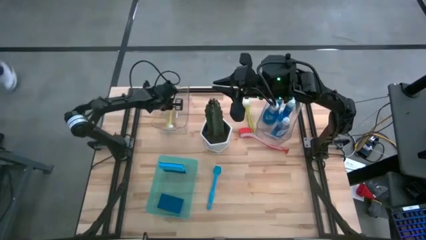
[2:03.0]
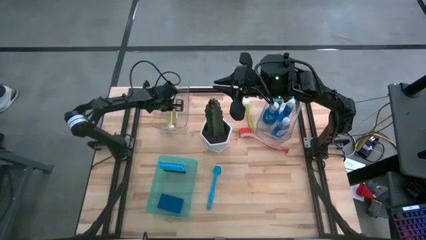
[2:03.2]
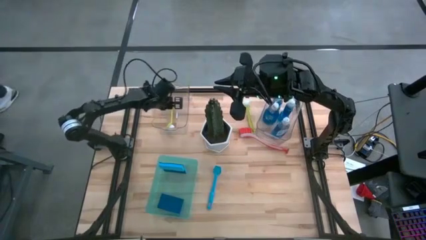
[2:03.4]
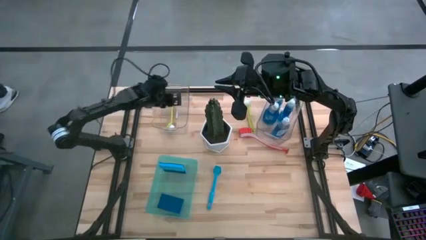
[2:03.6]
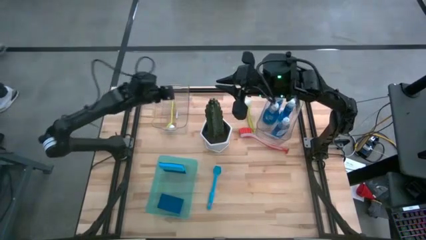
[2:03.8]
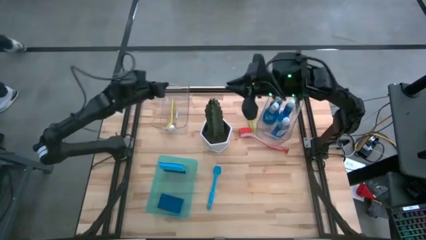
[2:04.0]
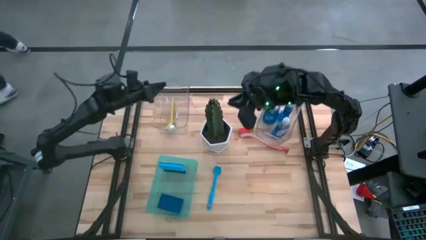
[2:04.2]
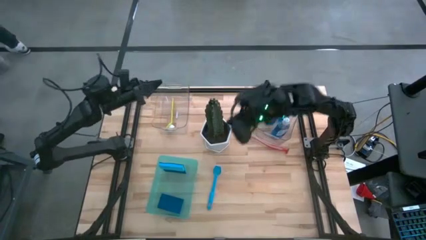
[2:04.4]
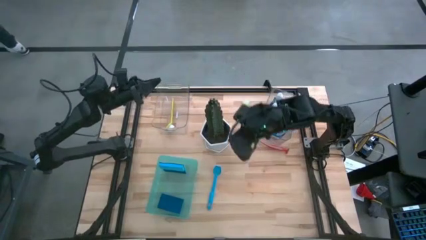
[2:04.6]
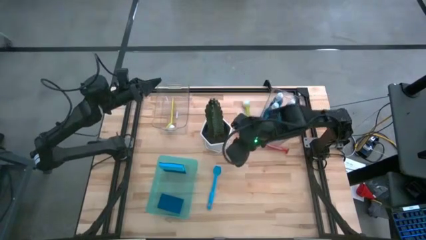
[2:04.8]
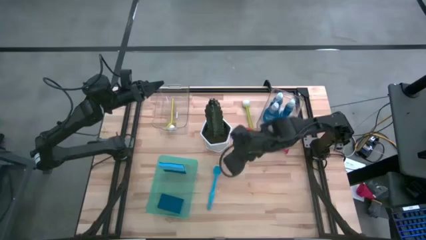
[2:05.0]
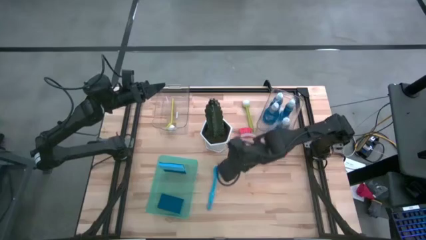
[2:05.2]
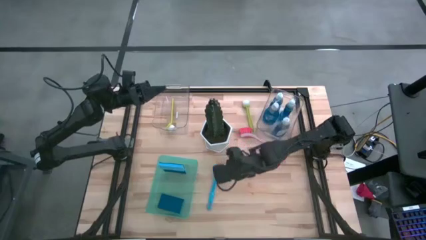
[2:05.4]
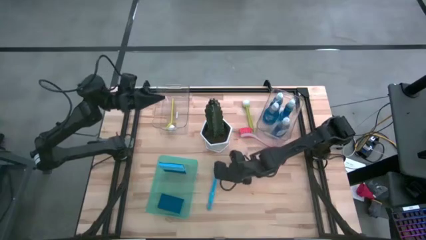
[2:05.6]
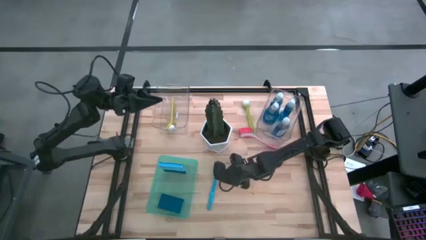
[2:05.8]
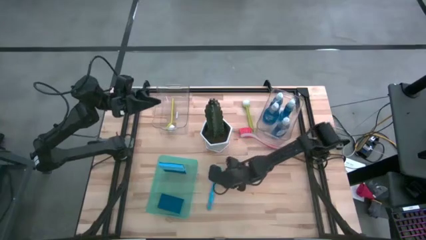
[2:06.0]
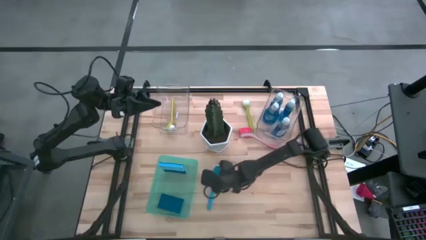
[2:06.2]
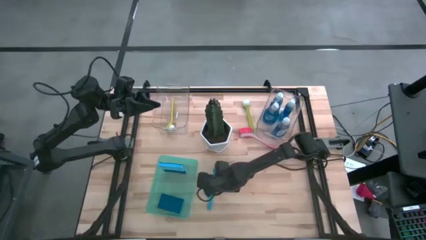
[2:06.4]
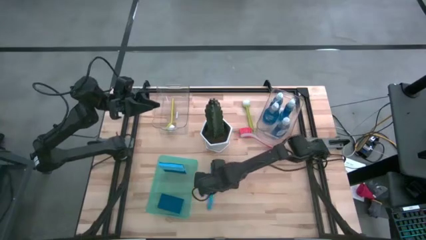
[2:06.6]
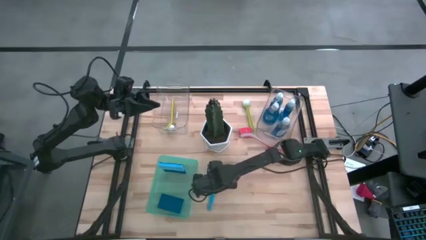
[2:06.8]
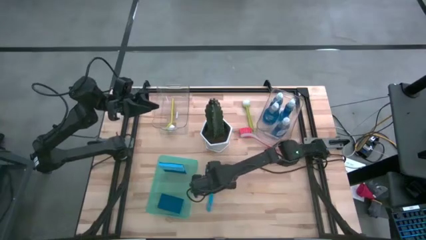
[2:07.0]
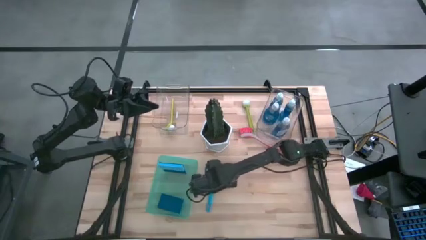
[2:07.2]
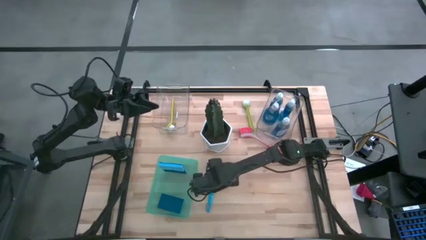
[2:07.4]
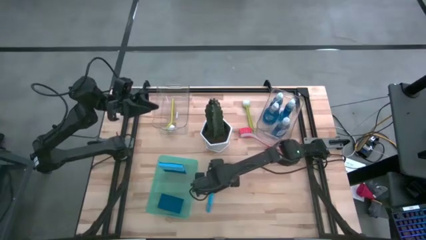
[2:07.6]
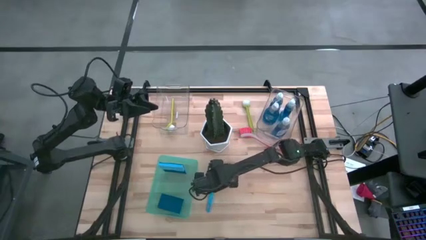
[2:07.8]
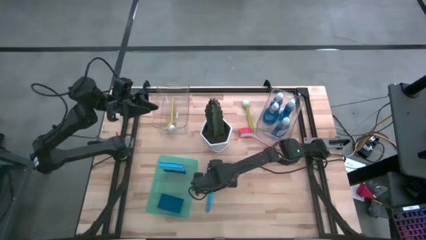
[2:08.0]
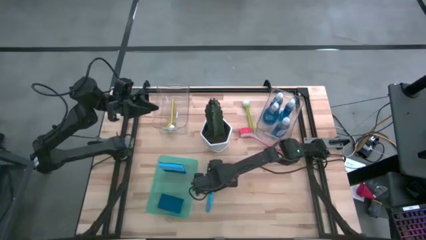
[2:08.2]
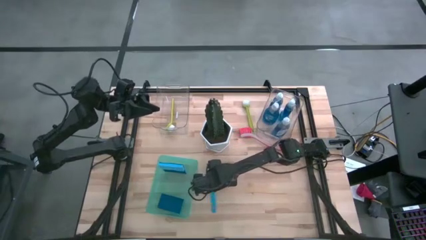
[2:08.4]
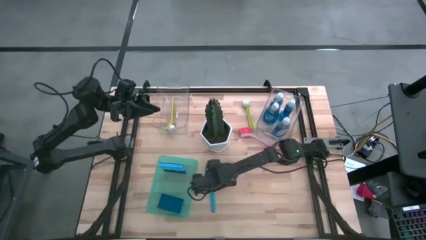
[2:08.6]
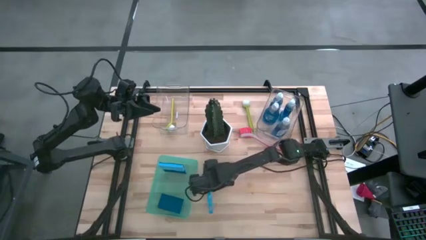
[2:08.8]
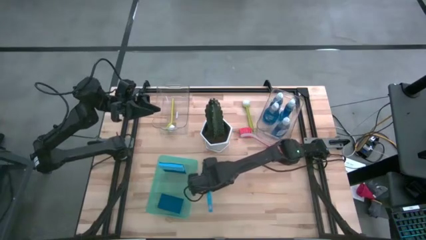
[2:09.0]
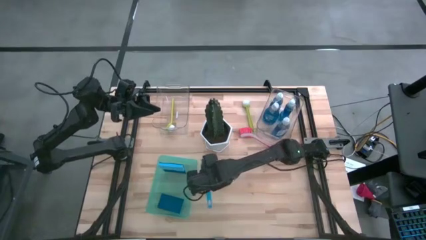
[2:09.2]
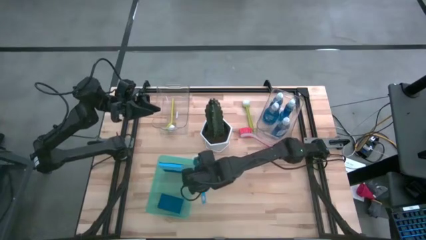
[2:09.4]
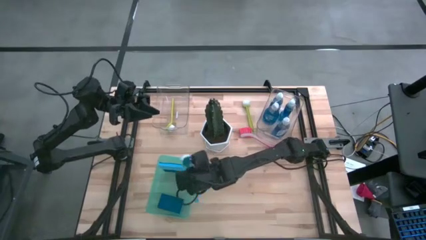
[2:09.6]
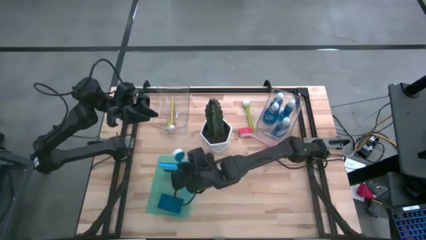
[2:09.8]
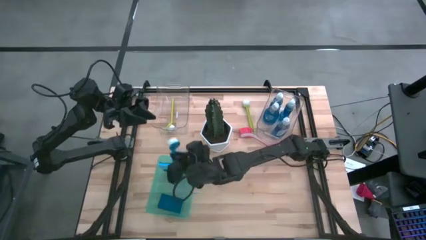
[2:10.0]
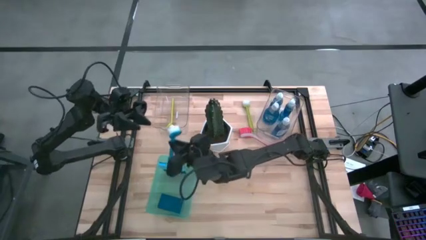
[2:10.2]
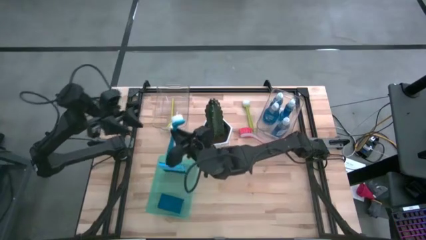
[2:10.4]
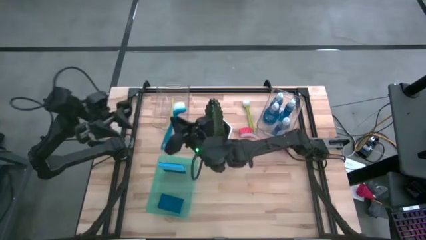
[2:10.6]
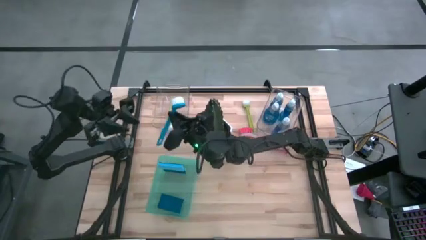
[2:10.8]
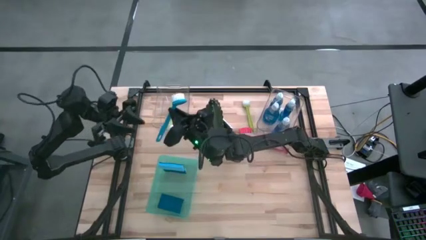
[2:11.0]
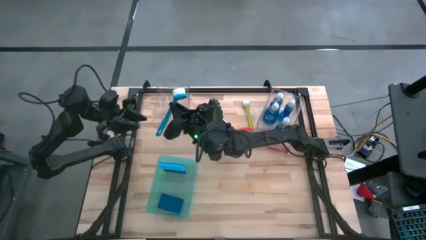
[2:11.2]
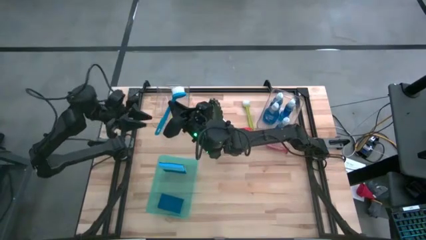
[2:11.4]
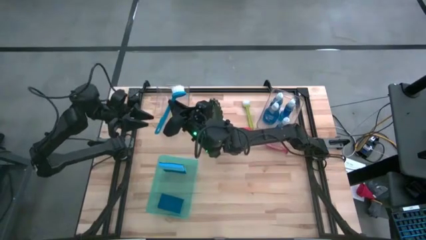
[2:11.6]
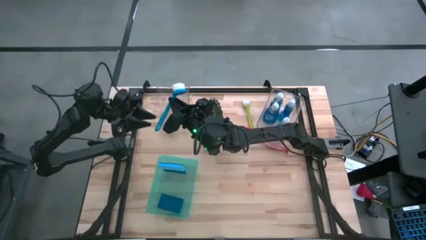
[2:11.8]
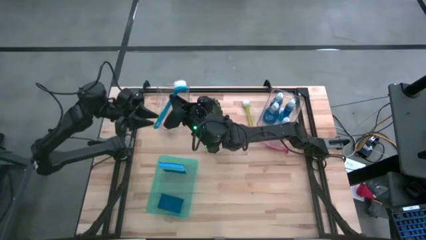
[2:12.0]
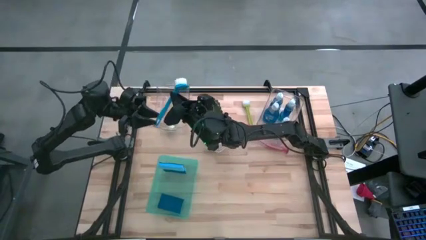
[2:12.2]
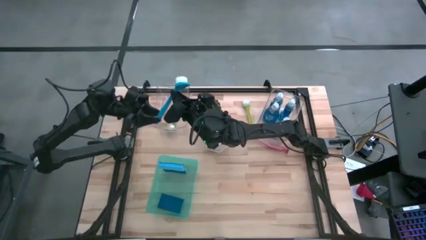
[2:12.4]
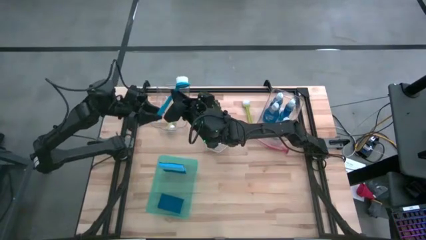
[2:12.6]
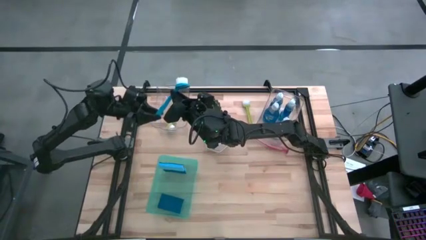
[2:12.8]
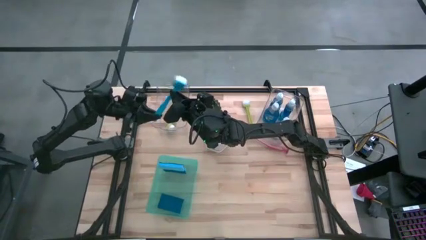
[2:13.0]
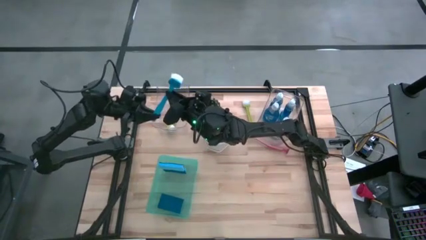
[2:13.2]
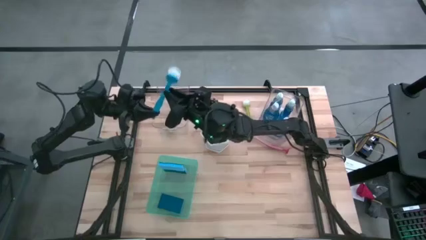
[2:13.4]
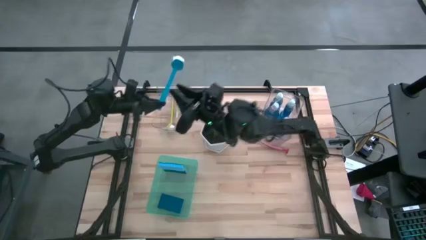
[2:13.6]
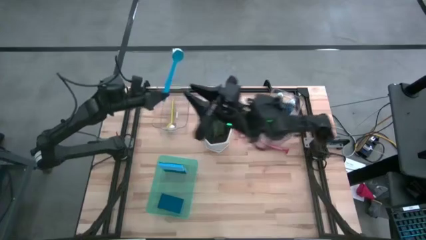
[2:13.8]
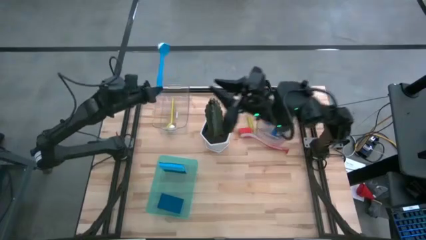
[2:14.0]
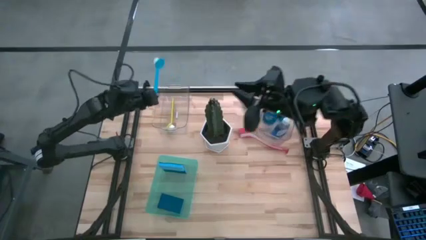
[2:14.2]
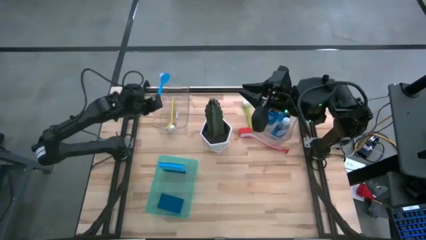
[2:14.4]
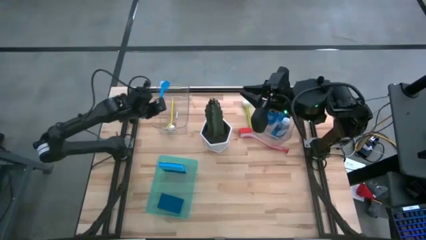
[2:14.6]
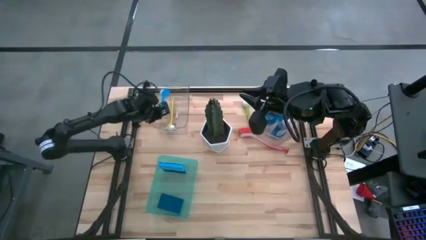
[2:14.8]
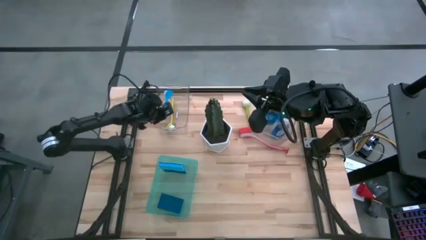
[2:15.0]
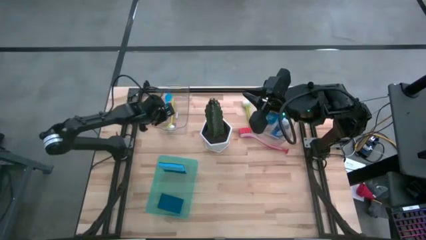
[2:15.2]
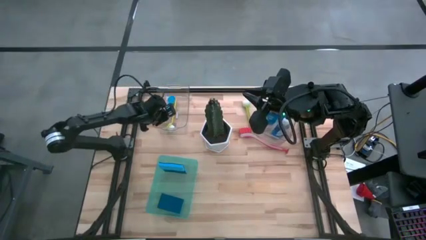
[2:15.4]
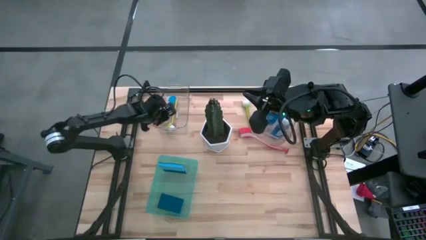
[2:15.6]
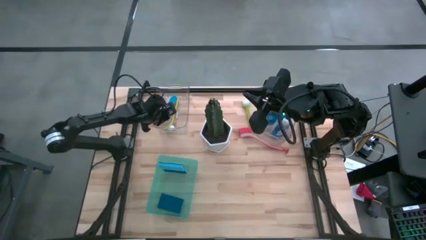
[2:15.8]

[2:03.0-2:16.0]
Task: Pick & Place Kitchen Sink Supplies
Put the blue dishwashing brush into the left transparent bin

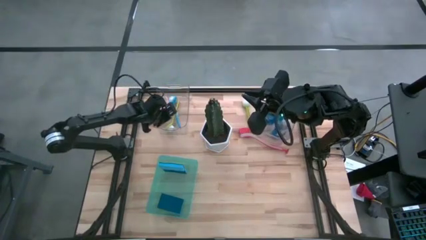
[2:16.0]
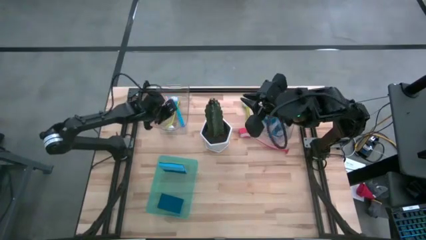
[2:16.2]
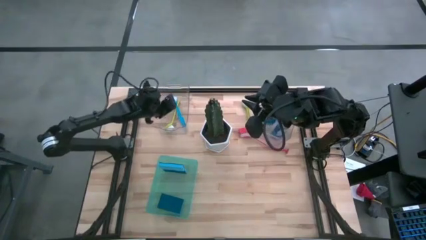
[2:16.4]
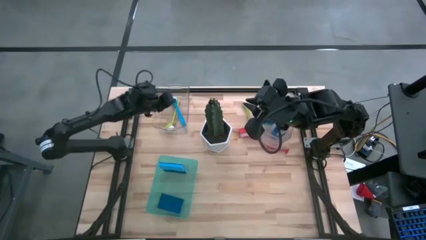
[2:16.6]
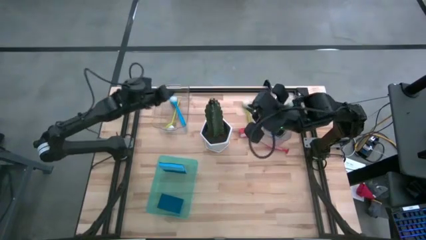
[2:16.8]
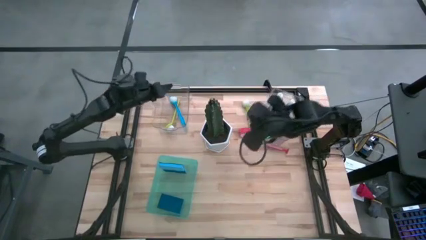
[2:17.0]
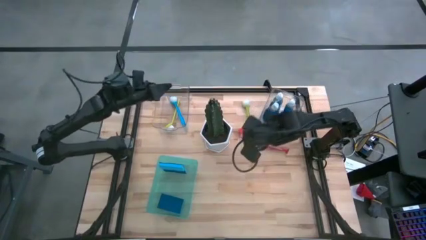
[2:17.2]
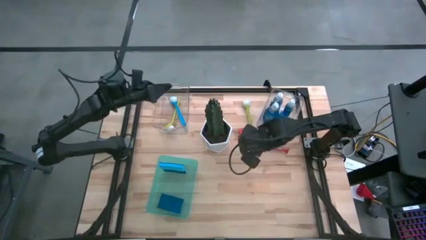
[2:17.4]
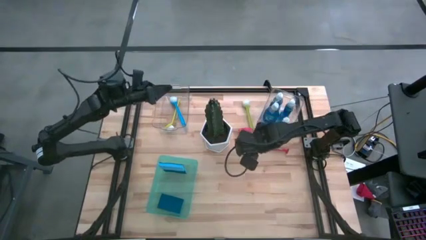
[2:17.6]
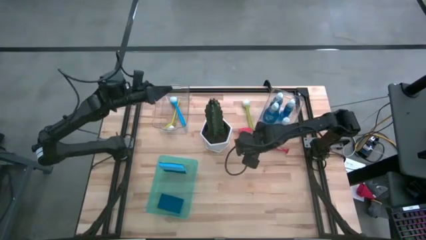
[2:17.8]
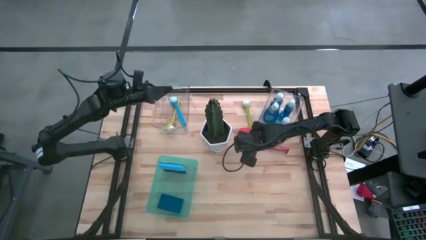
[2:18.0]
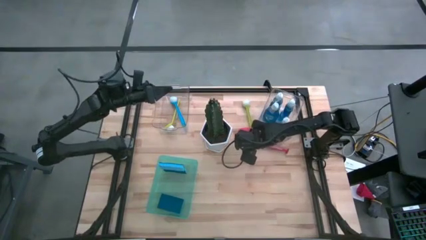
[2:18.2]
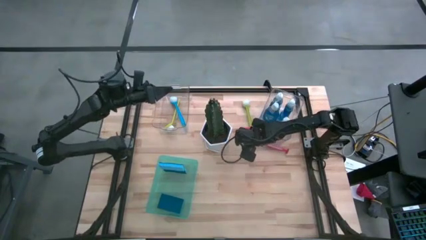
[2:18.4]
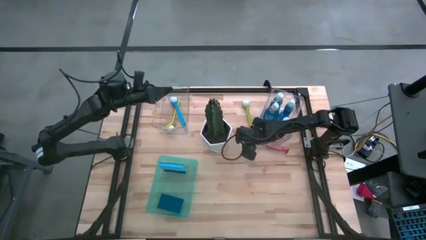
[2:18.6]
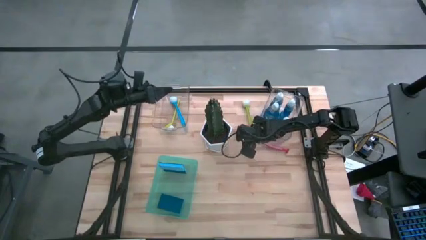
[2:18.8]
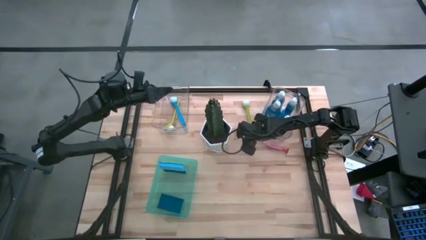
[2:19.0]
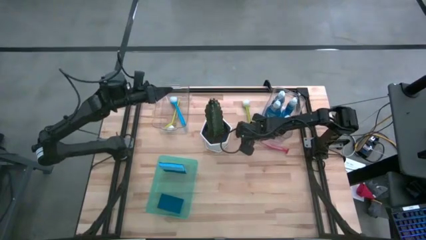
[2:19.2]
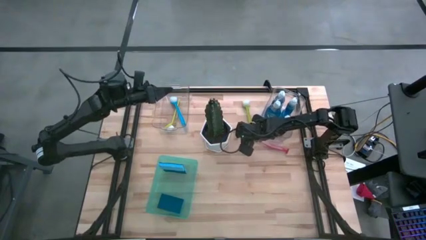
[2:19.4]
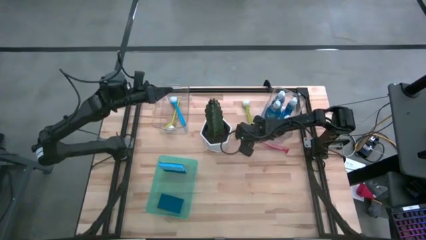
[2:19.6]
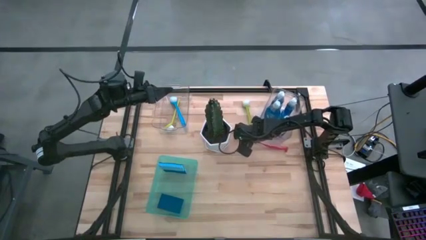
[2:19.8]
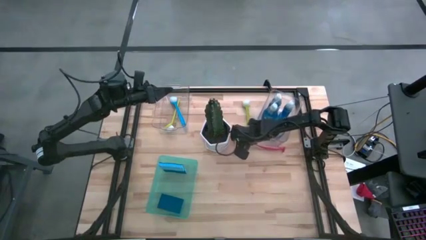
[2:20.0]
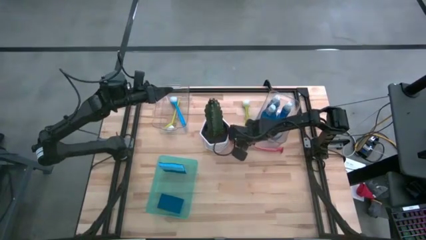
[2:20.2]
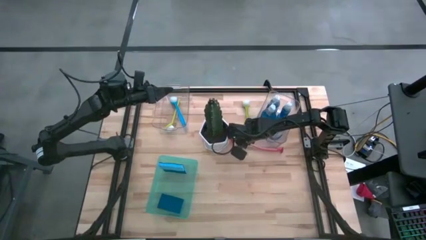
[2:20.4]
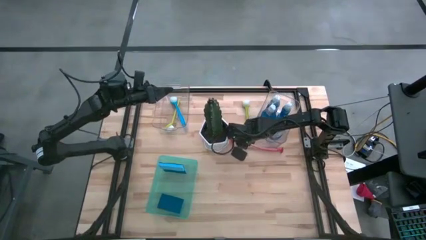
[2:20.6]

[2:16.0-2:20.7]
Put the red dishwashing brush into the left transparent bin
